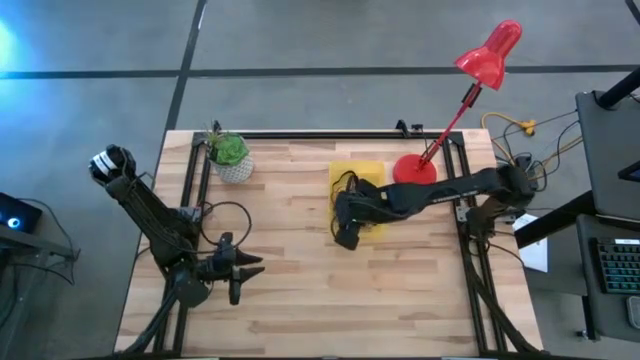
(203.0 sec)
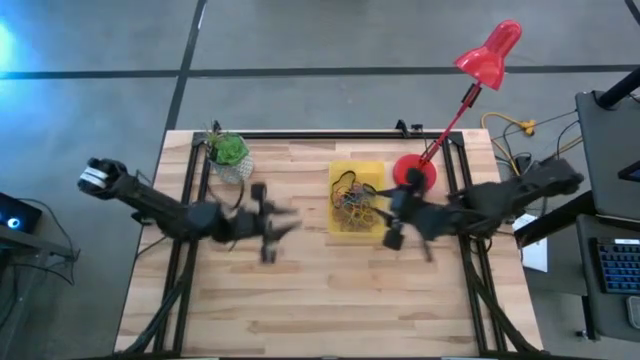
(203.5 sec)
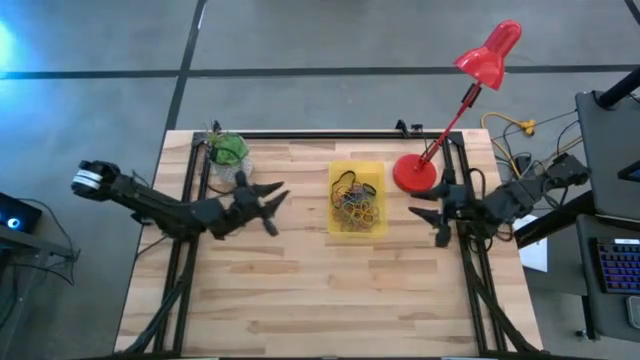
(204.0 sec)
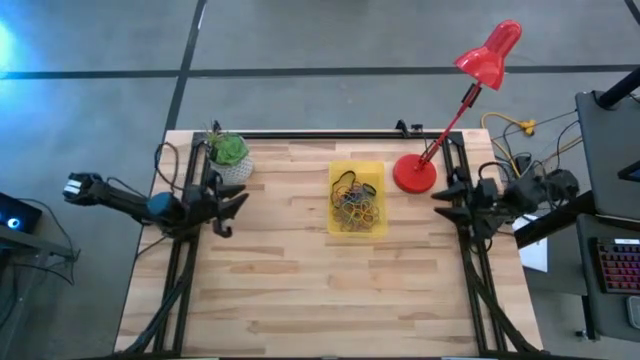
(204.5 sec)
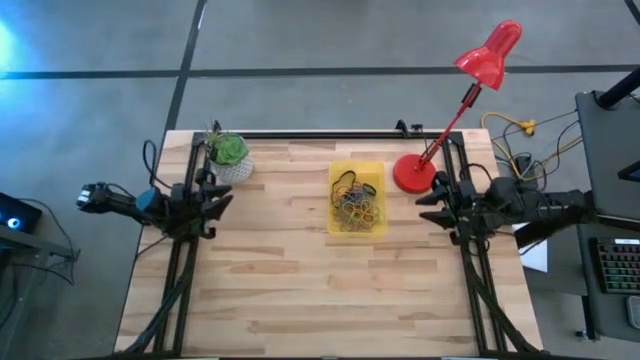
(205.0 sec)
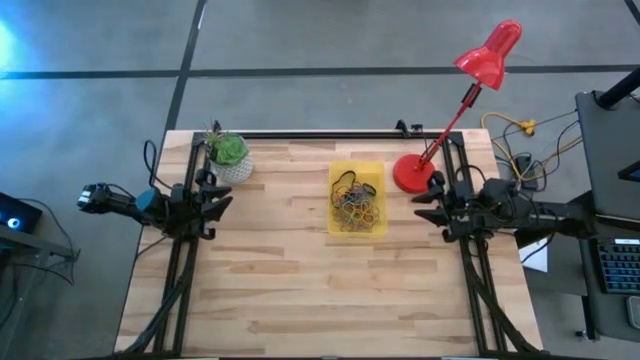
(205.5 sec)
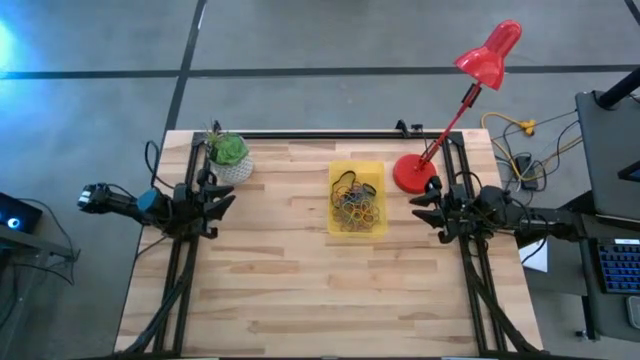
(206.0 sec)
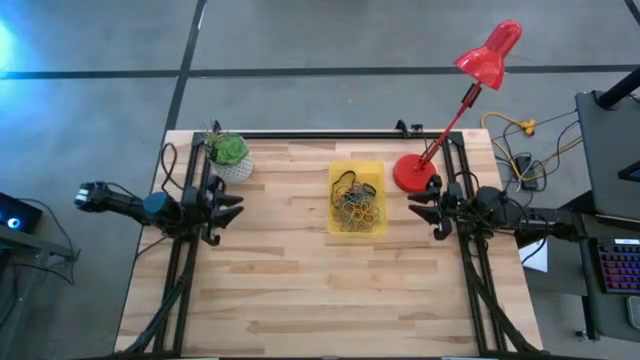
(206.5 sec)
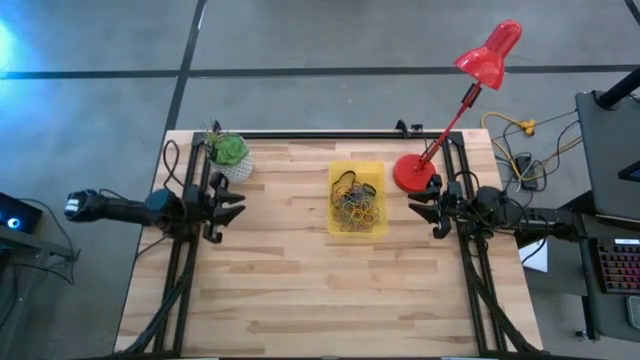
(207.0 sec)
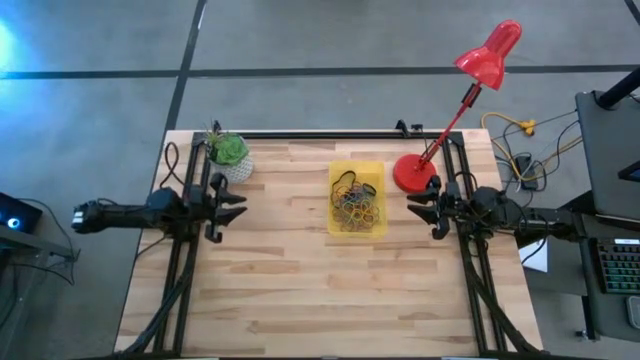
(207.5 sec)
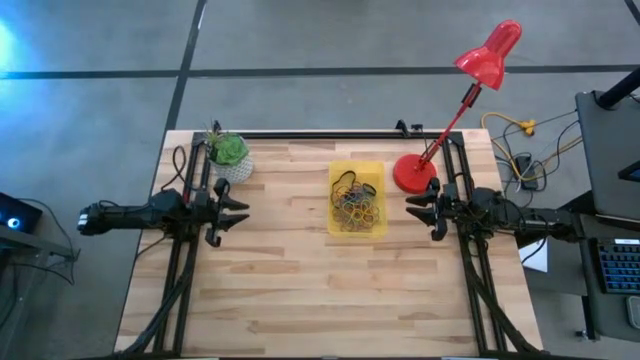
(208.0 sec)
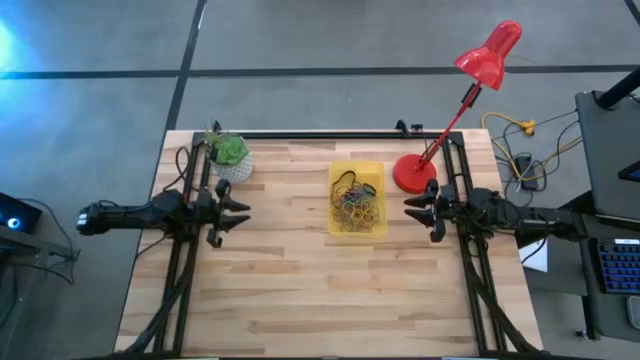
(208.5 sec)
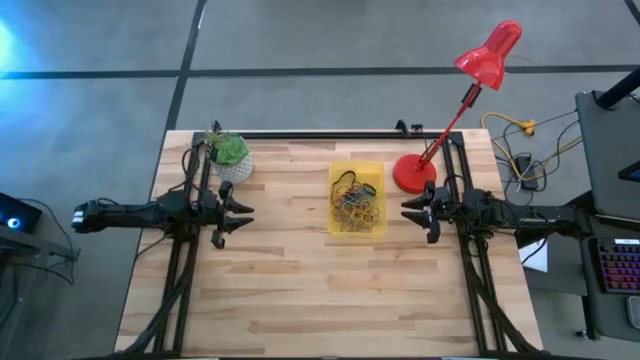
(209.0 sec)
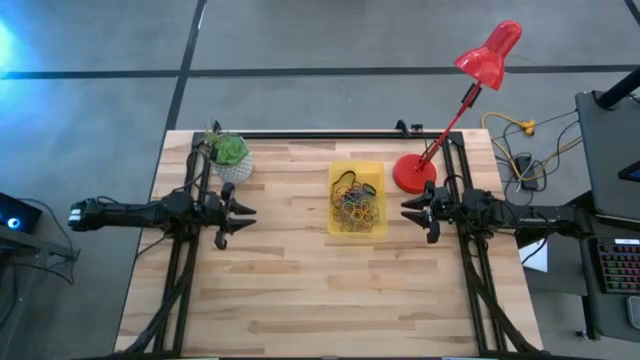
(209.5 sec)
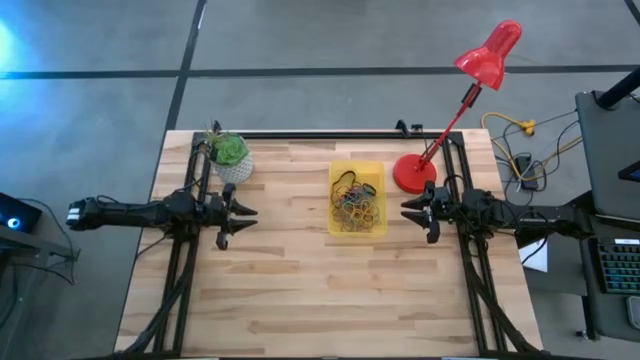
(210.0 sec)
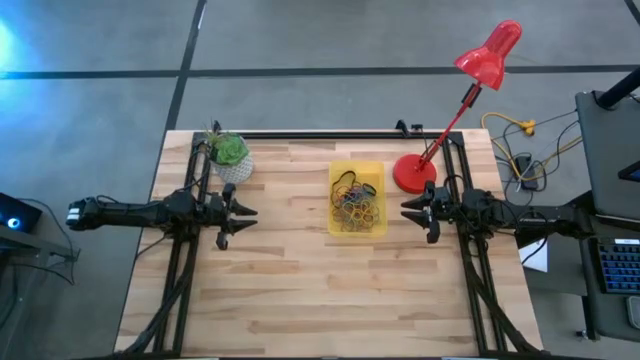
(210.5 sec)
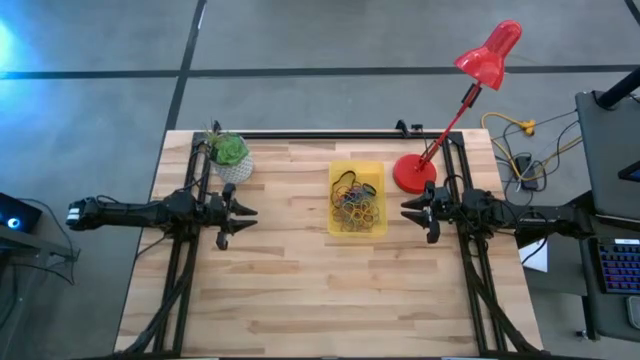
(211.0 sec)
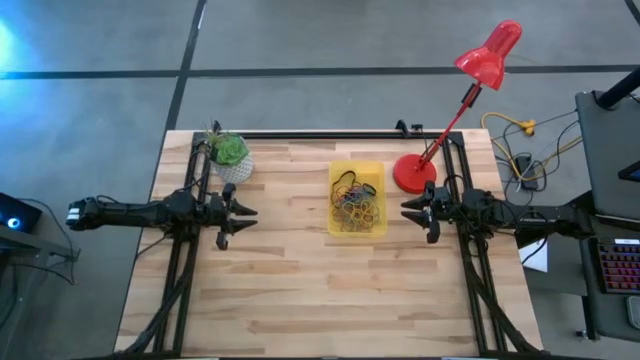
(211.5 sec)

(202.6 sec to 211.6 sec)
Task: Pick and place rubber bands into bin
Return to Home Position

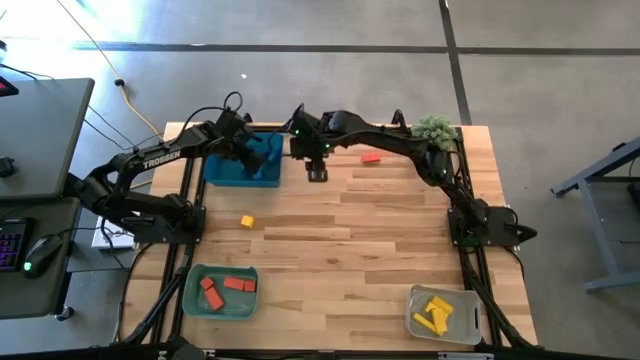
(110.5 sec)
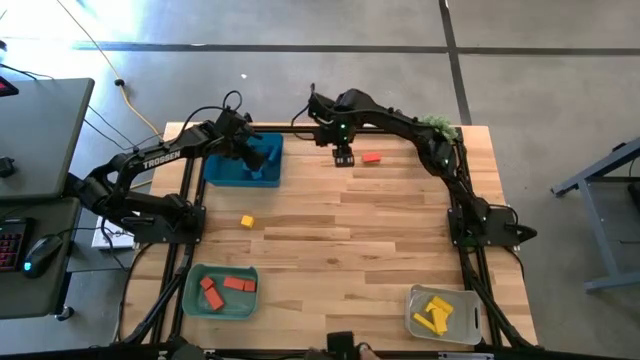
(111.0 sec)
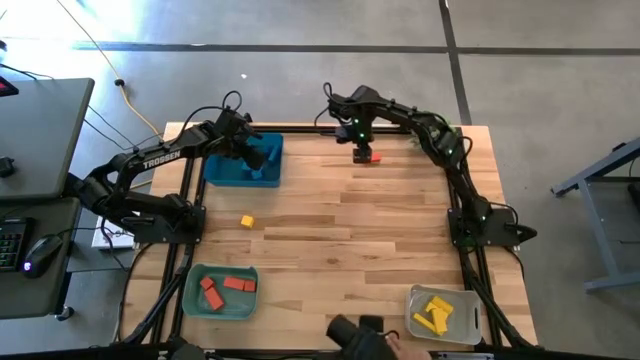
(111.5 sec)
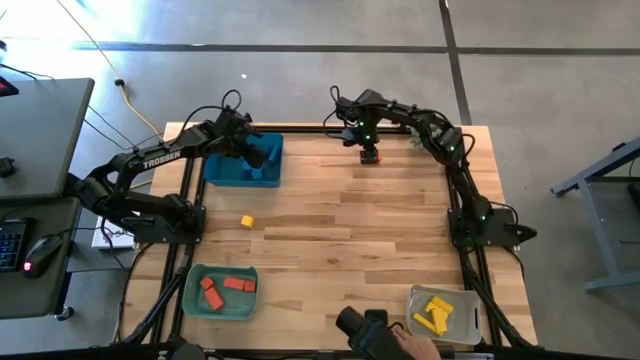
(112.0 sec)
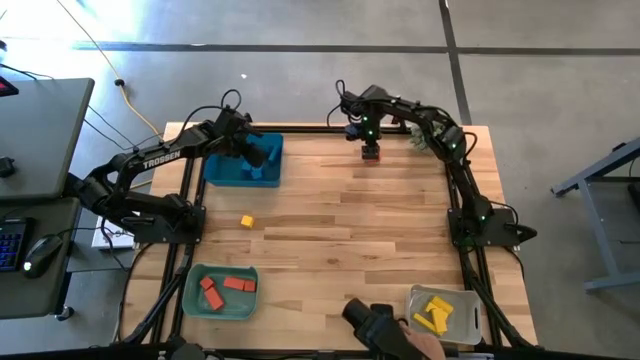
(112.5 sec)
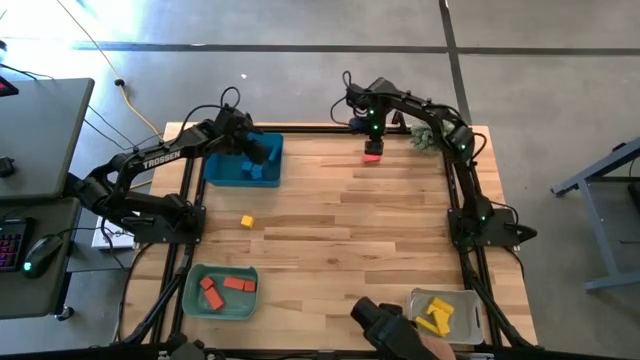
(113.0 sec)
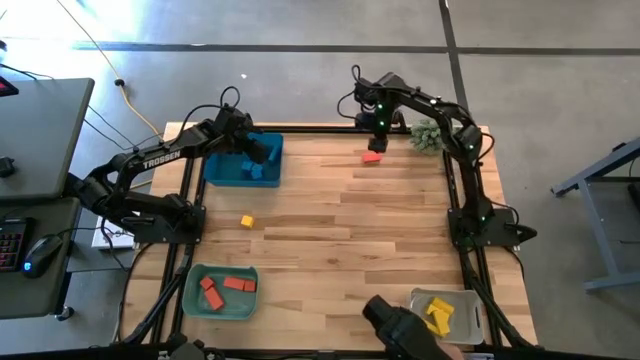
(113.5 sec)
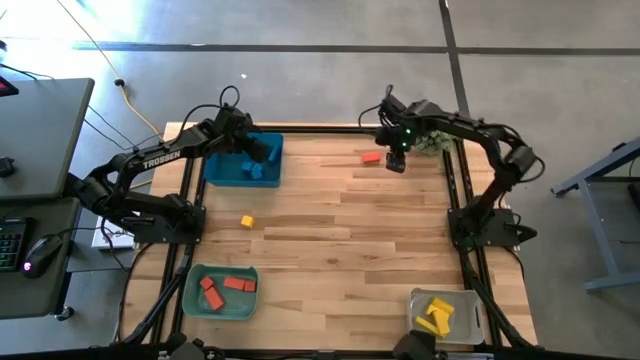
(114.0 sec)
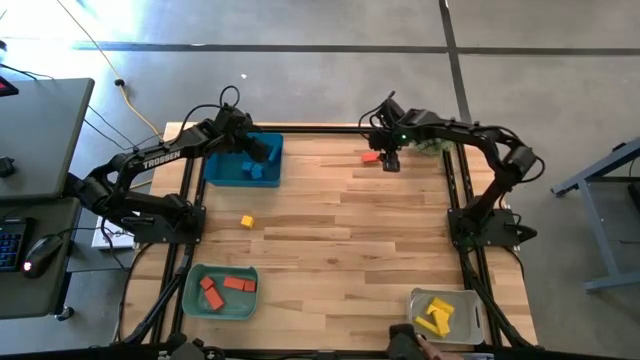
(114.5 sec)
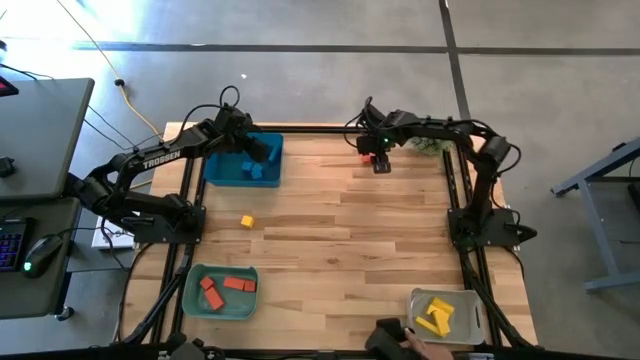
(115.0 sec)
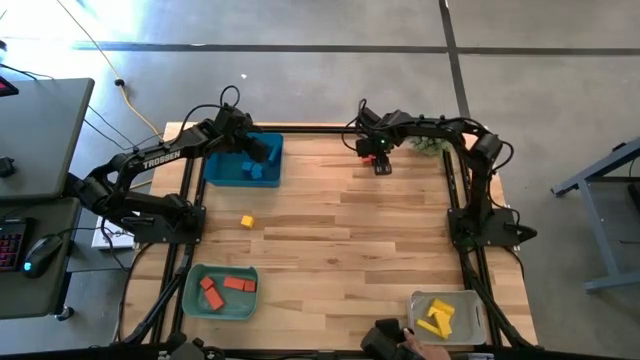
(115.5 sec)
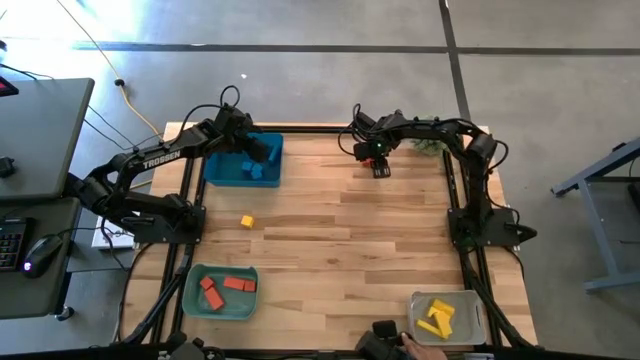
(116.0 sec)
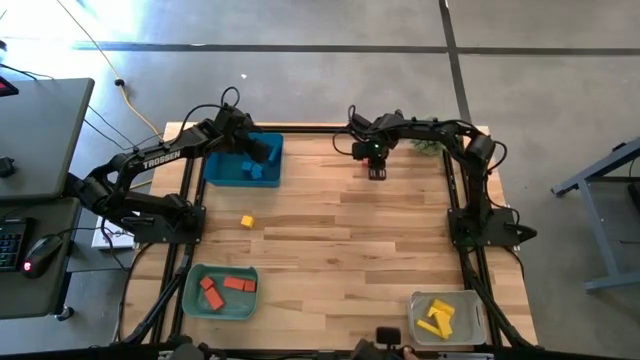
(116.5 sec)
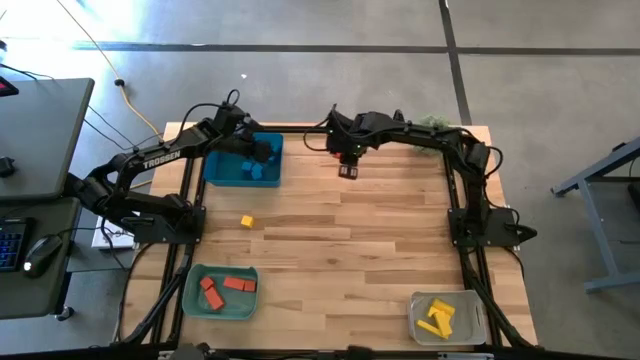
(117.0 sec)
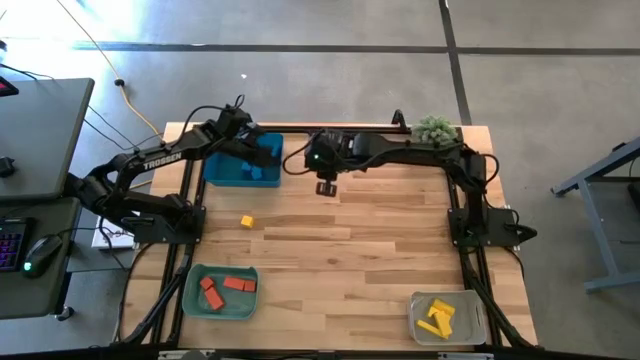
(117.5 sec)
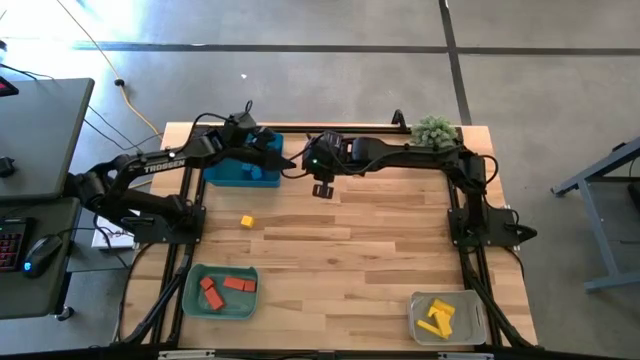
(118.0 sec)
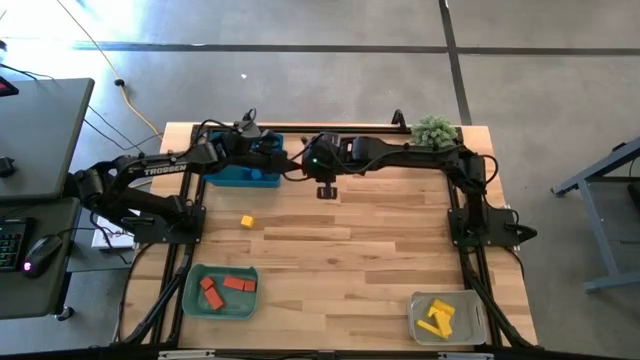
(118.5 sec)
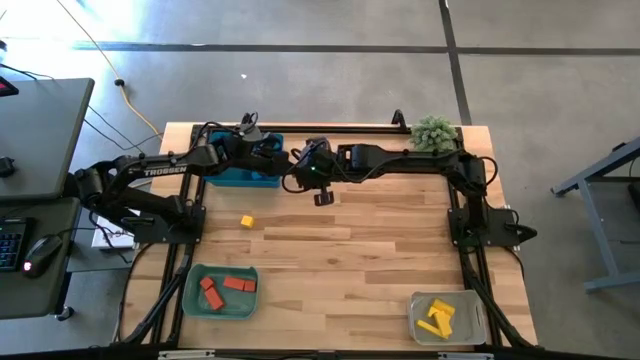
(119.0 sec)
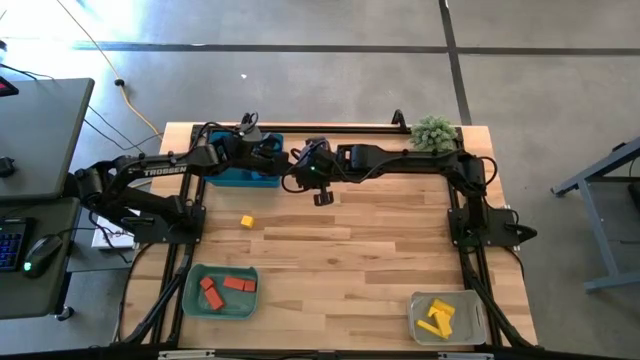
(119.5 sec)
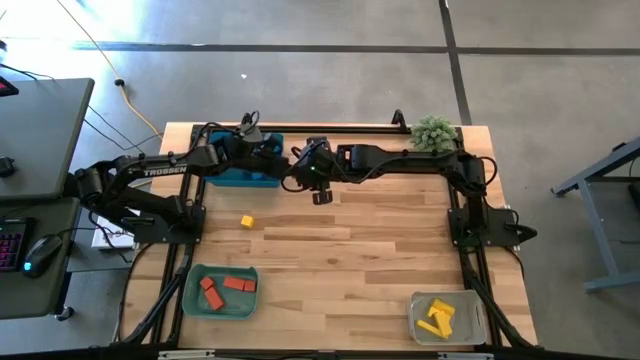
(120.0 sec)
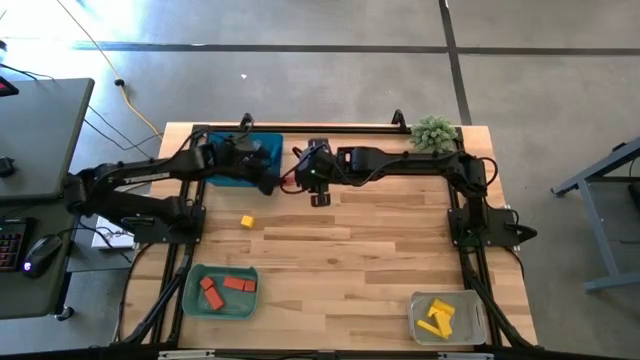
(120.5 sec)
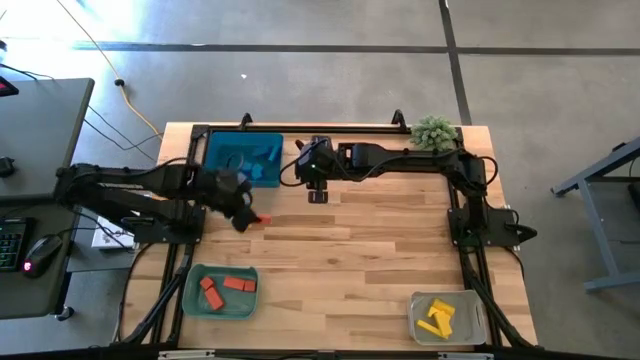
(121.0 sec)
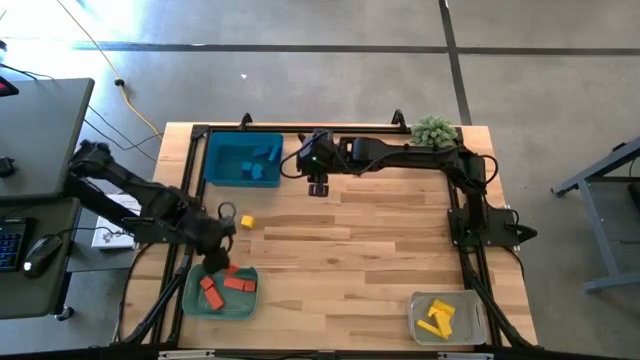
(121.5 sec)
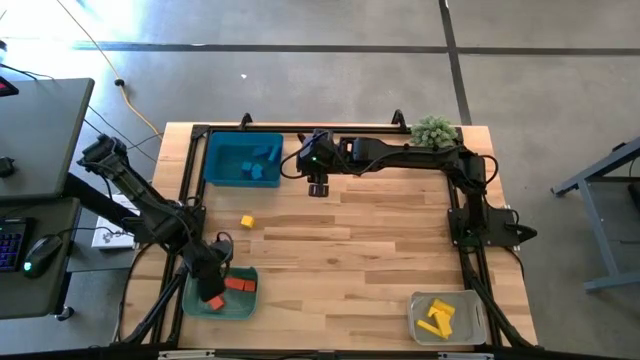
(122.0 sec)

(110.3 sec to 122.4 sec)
Task: Sort & place blocks by color
Put the orange block into the green bin
